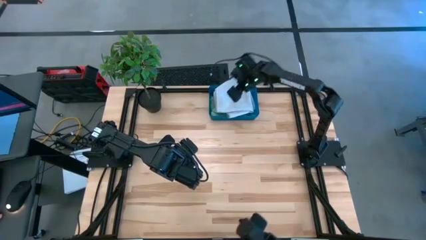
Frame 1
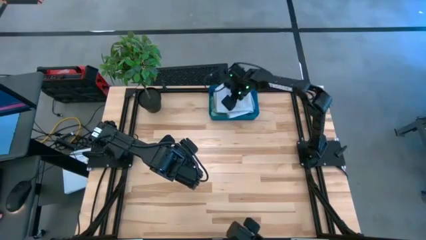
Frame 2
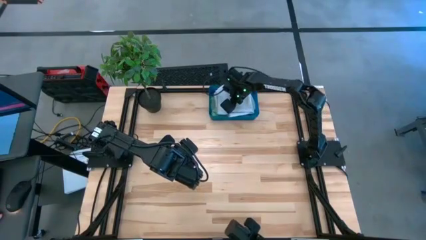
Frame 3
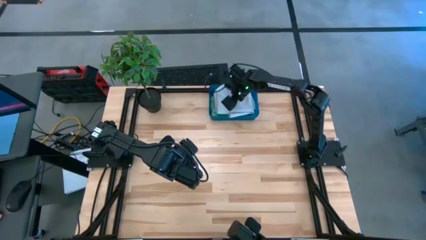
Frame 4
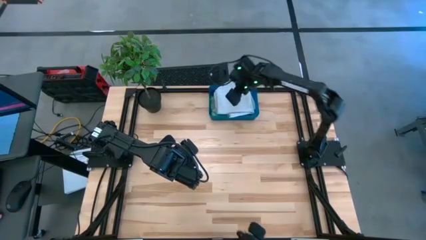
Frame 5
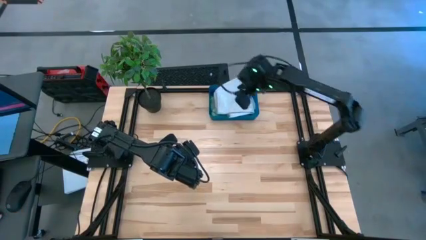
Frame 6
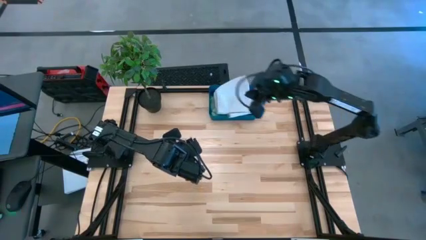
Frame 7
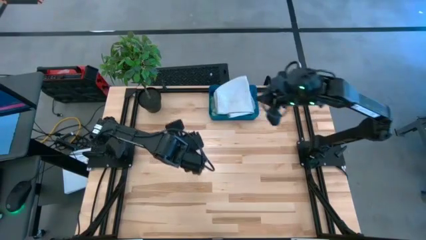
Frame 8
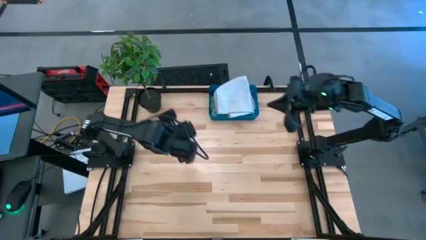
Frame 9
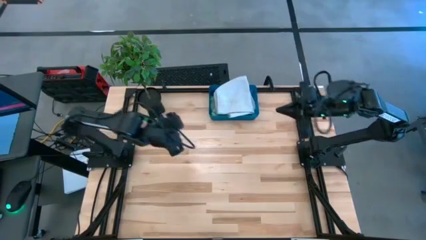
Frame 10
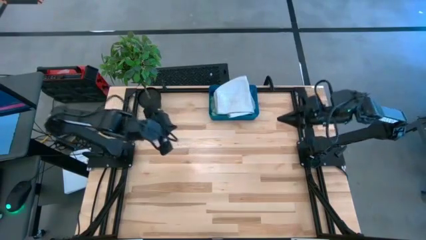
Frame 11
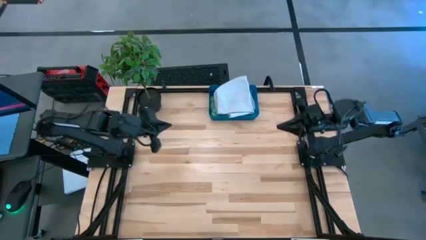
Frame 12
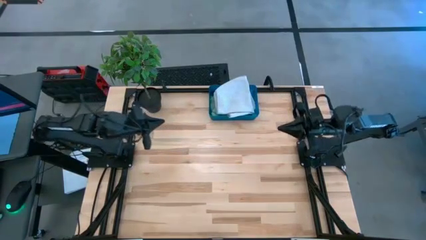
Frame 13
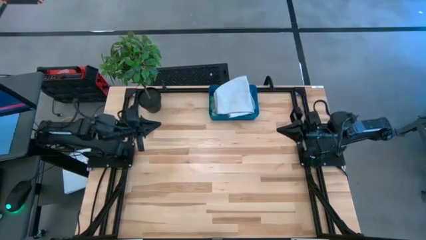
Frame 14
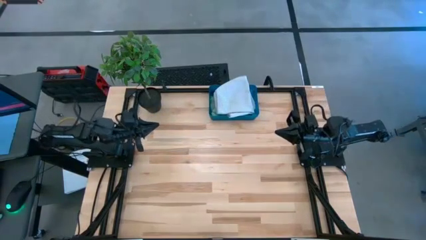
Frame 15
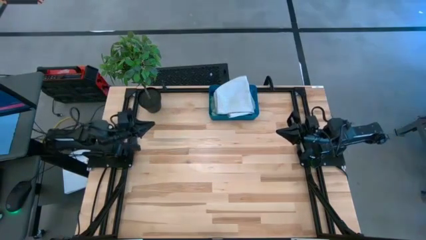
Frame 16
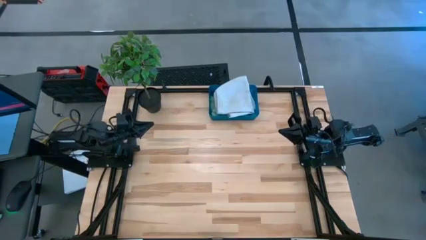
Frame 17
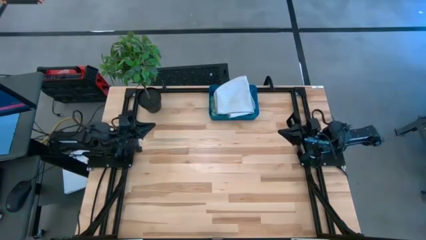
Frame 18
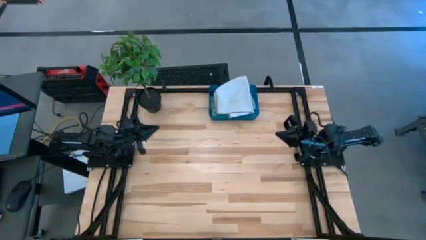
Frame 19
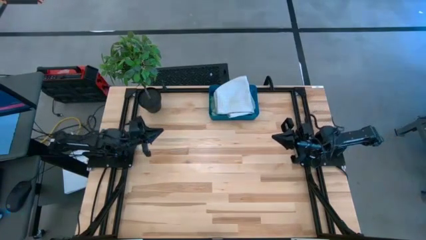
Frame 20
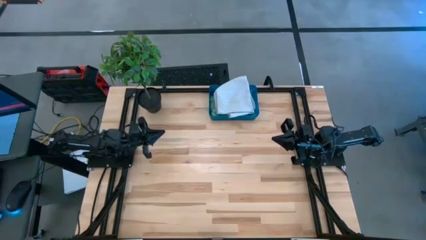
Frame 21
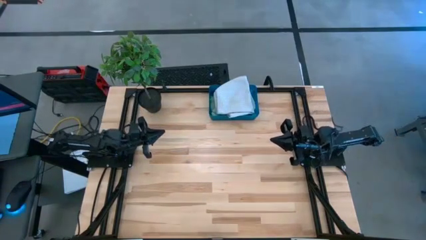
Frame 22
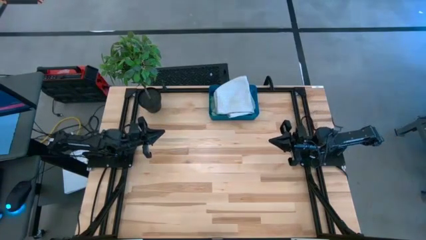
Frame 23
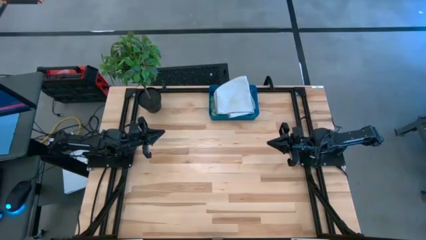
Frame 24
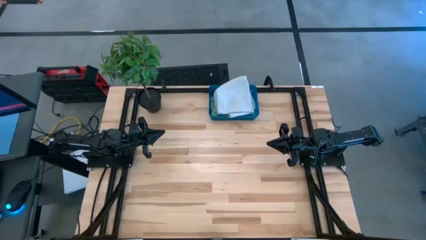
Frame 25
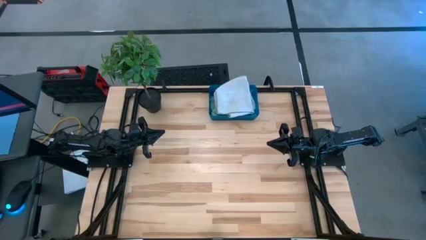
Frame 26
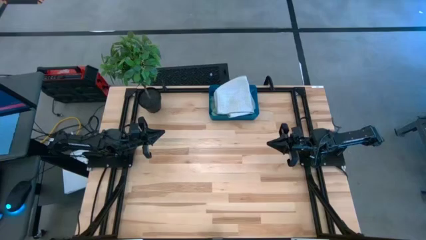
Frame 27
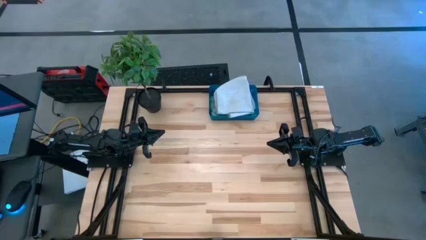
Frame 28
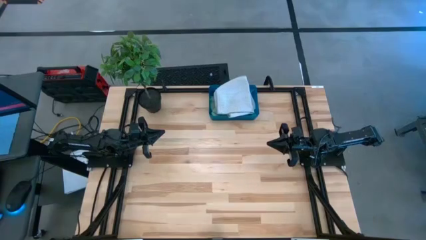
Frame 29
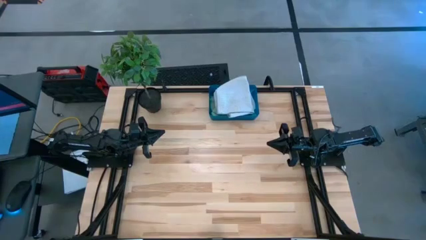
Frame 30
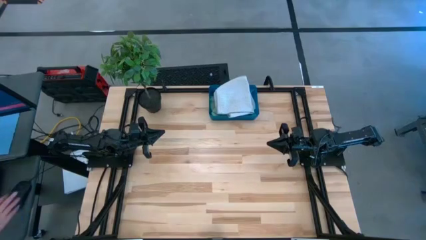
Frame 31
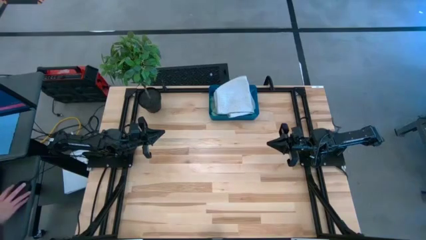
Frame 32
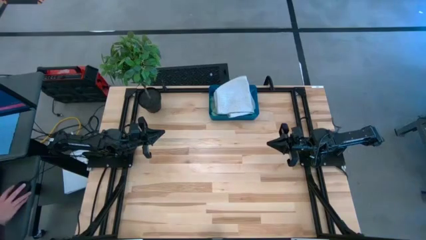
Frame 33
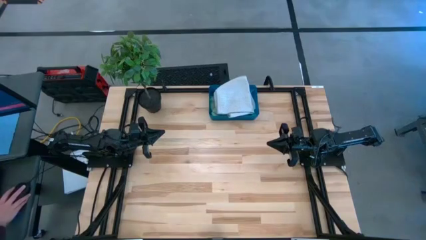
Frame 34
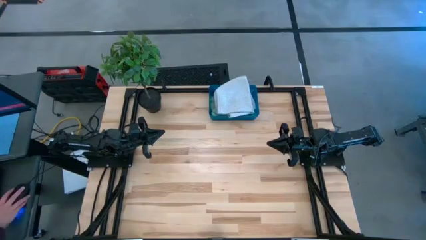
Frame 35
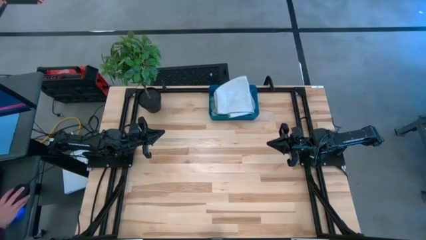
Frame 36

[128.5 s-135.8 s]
Task: Fold microfiber towels
Return to Home Position

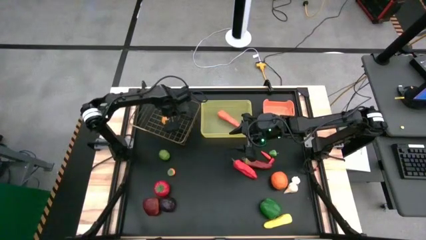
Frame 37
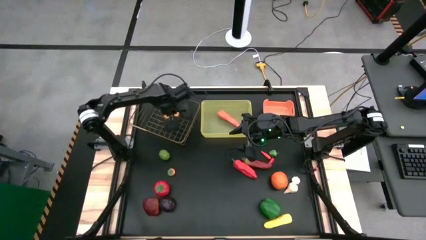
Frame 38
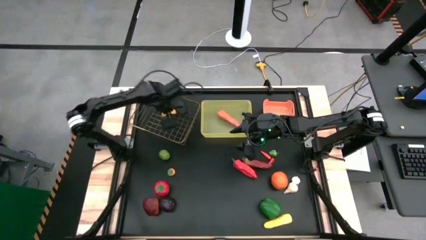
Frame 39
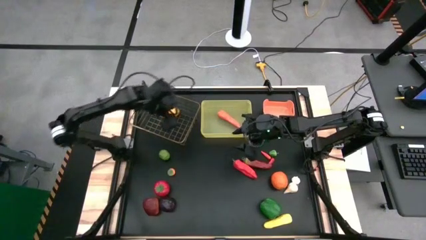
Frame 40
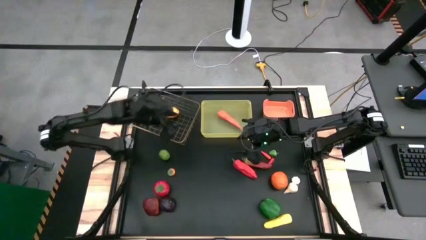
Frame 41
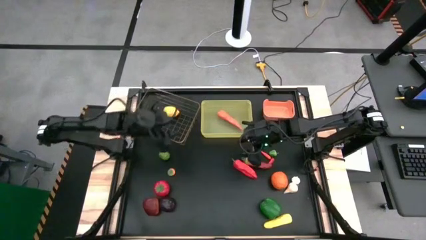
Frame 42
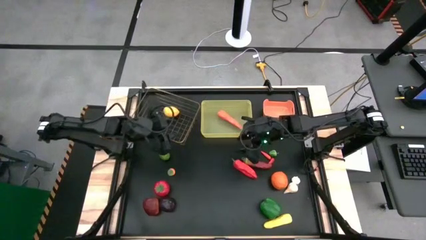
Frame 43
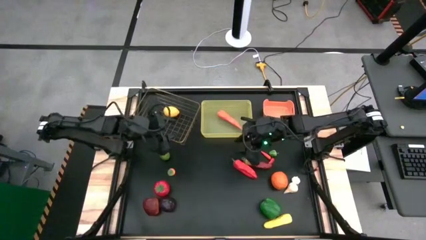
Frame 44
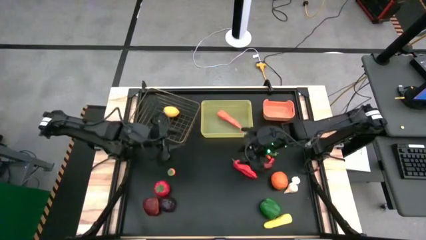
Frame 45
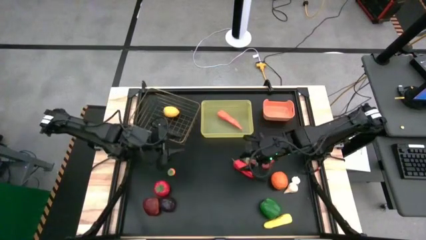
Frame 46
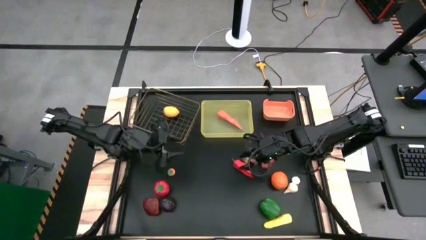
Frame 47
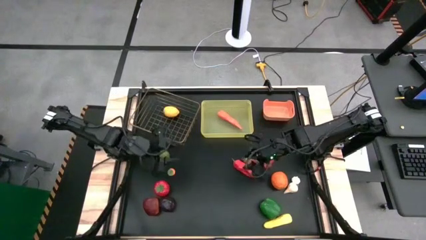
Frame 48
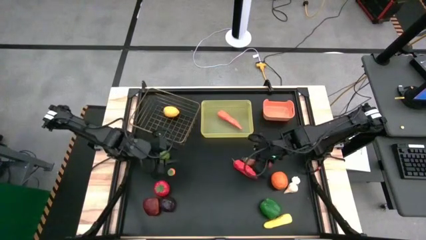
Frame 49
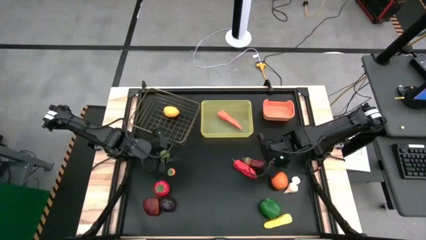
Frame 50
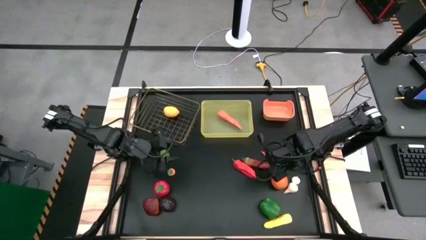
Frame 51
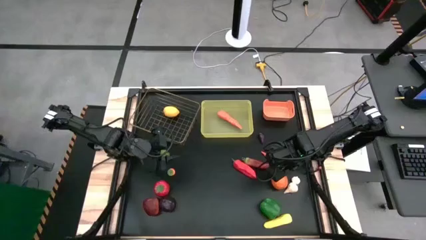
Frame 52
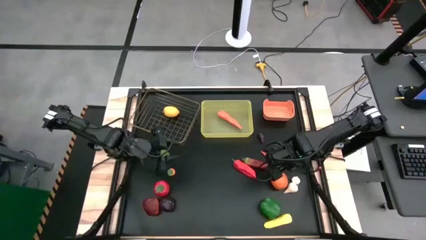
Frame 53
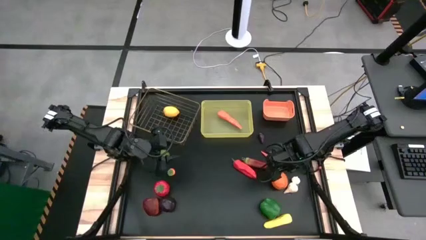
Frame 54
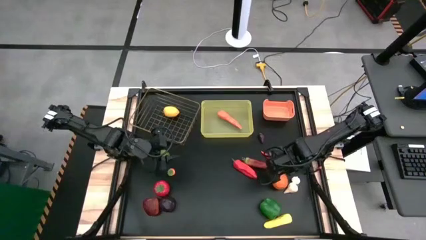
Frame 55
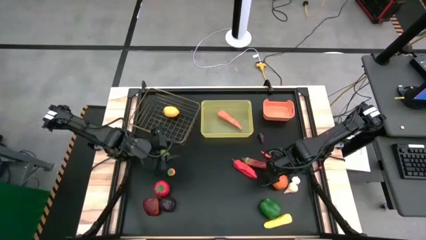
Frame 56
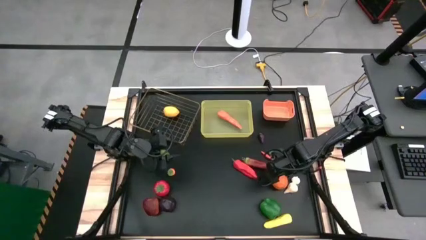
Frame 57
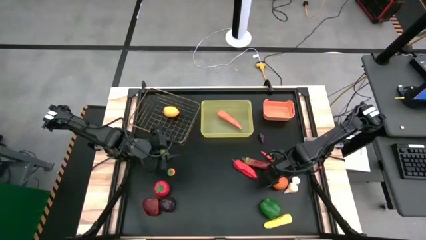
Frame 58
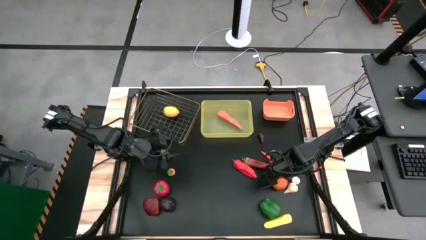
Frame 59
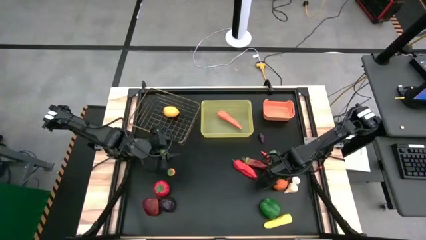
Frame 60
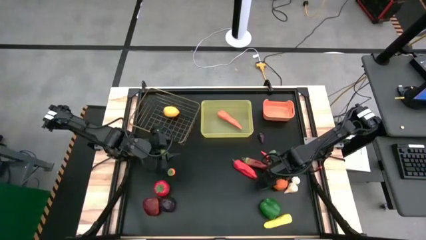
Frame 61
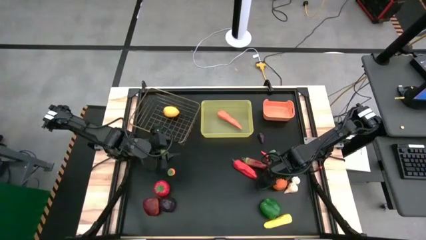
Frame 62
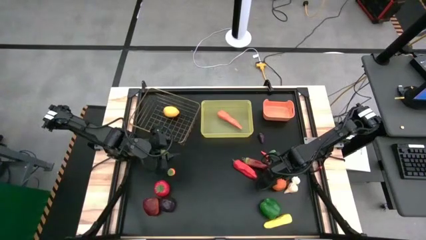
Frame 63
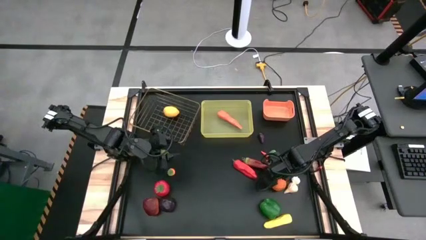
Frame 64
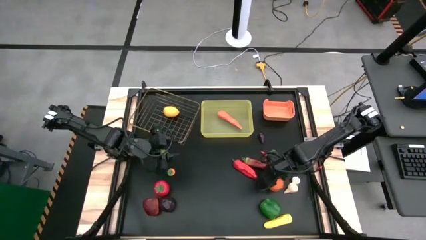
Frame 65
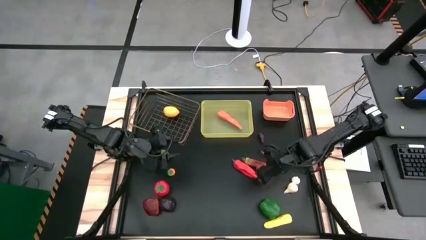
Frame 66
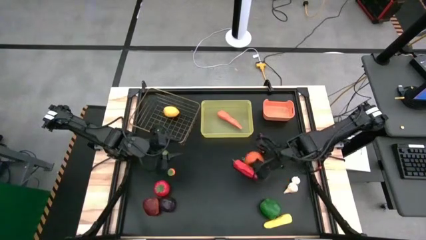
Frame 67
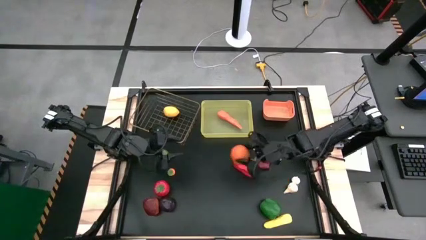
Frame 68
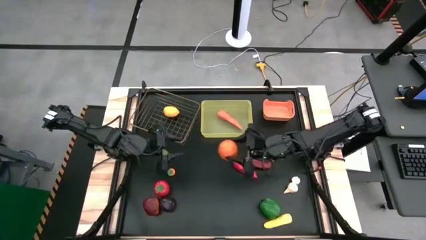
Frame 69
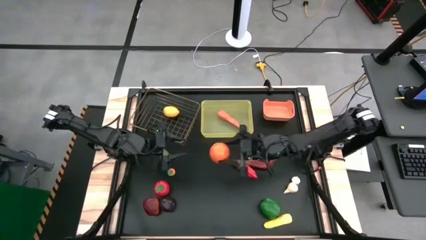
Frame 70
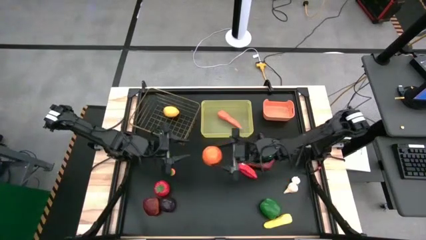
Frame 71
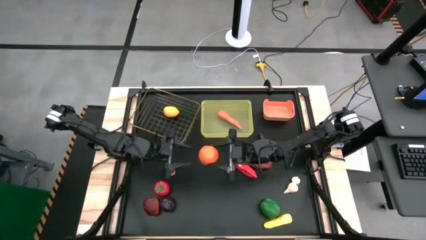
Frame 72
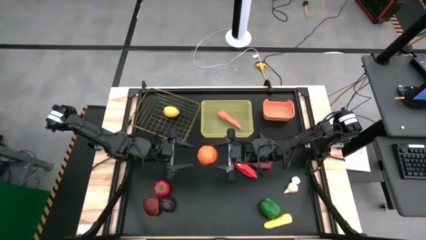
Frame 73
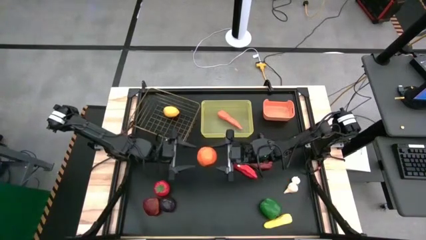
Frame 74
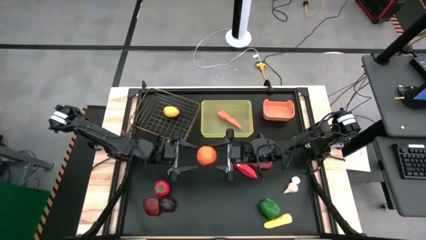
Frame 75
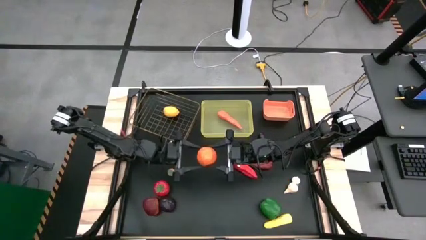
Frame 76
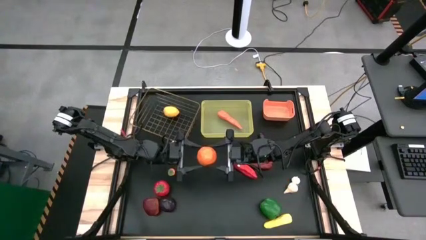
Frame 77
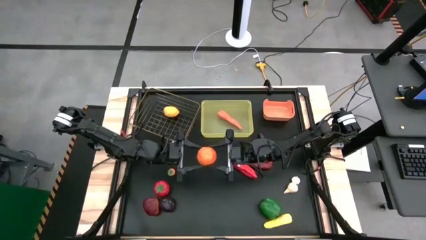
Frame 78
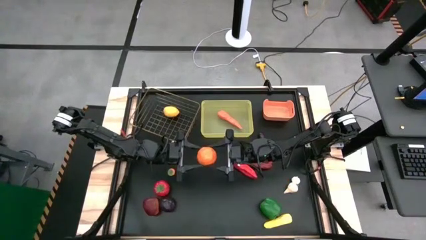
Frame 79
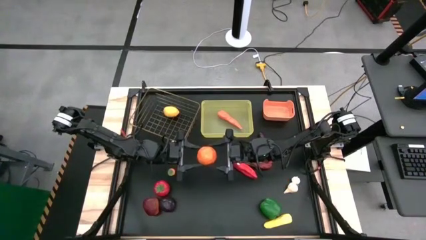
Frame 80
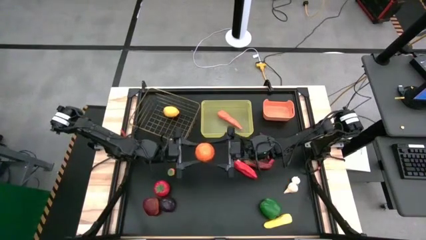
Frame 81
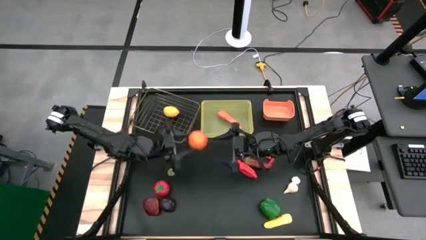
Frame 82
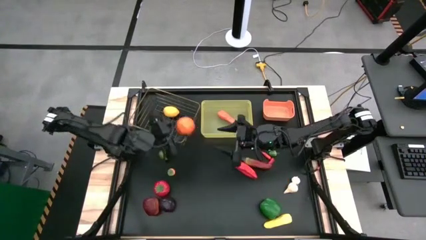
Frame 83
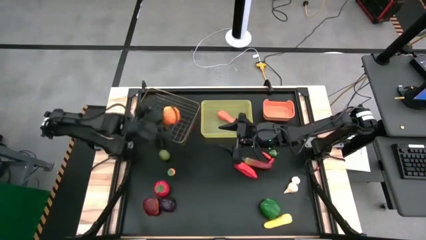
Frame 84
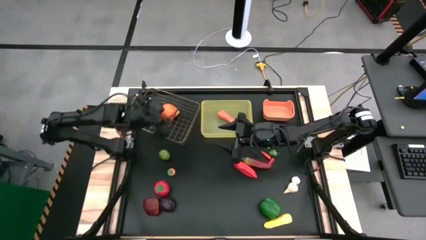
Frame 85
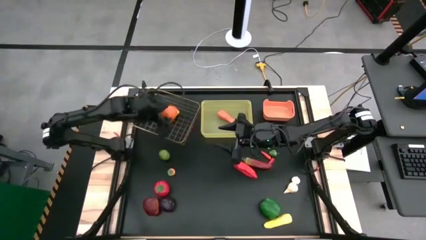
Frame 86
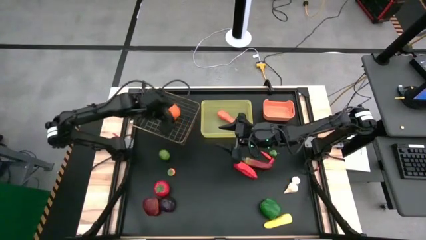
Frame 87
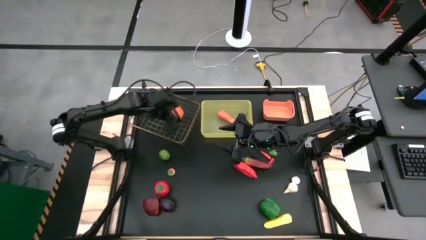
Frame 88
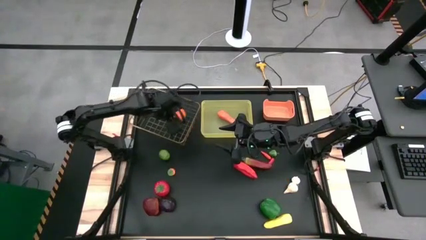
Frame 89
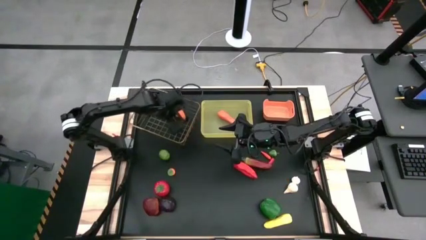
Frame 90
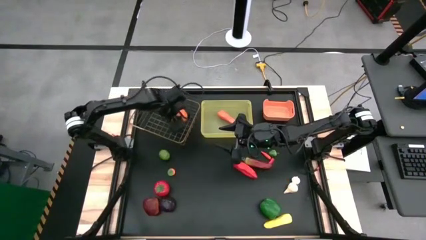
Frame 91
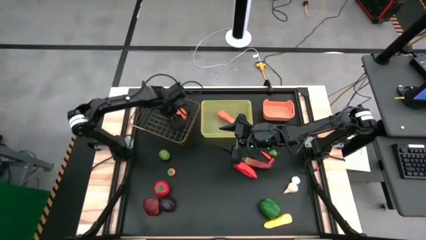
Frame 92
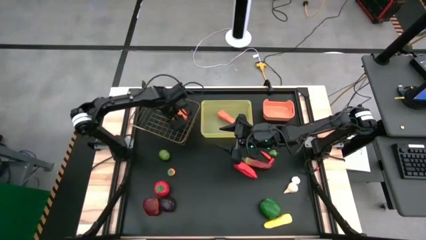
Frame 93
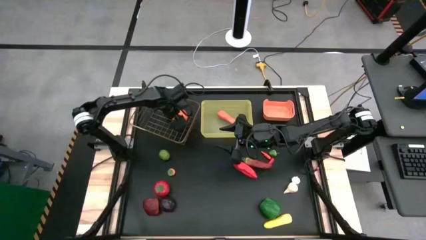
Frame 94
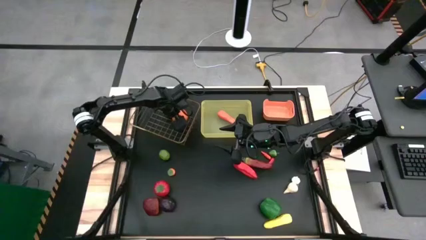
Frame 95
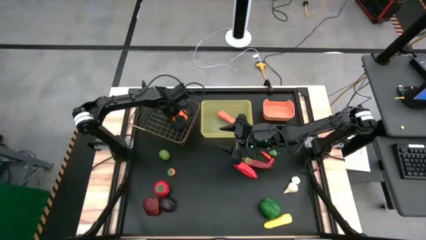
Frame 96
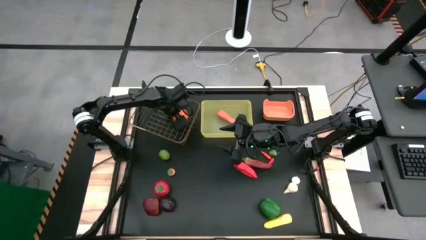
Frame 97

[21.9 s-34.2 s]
Task: Sort produce into baskets
Put the orange into the wire bin
